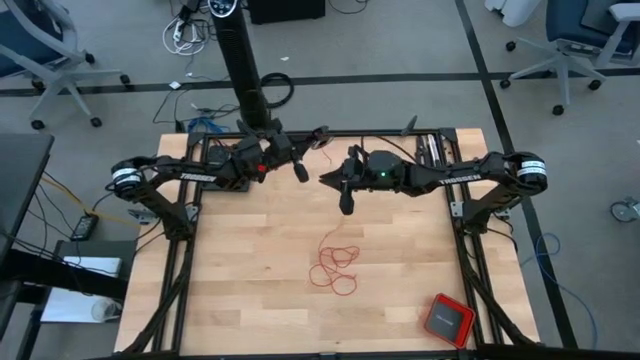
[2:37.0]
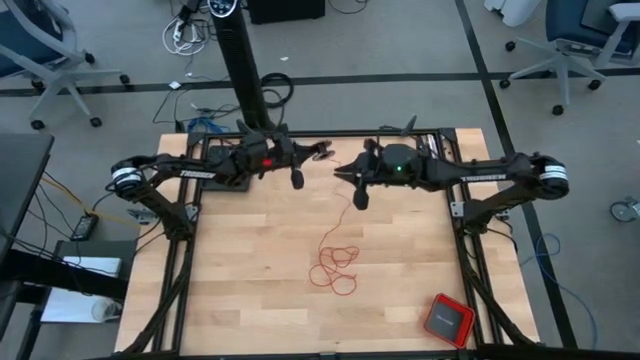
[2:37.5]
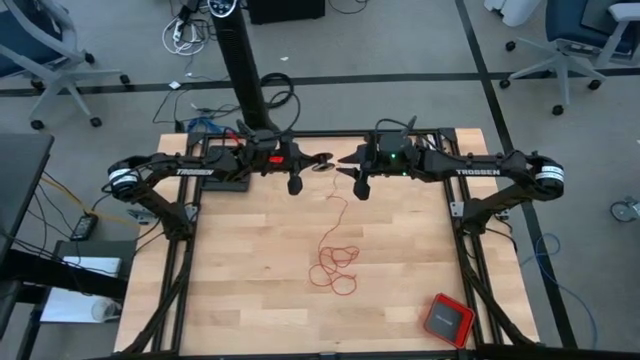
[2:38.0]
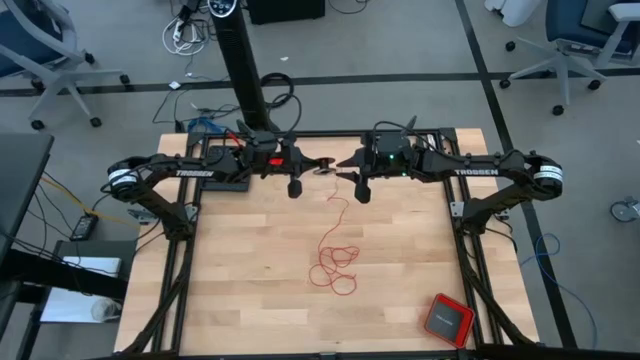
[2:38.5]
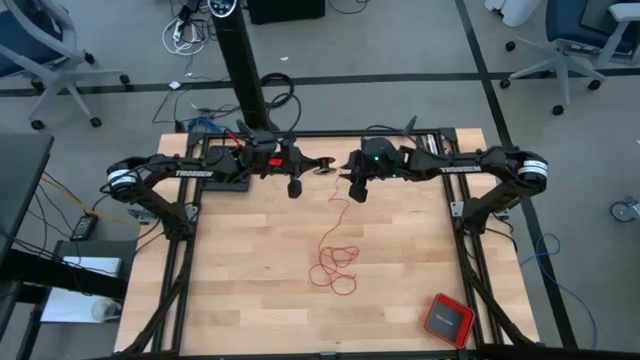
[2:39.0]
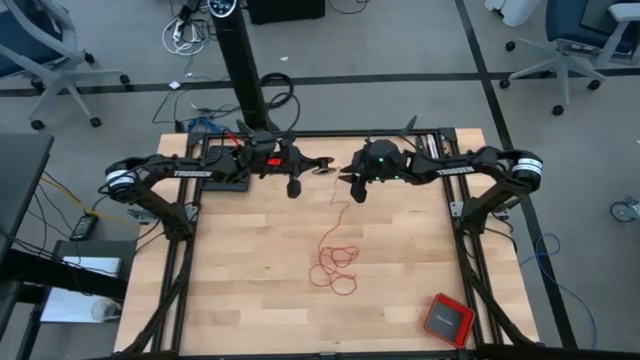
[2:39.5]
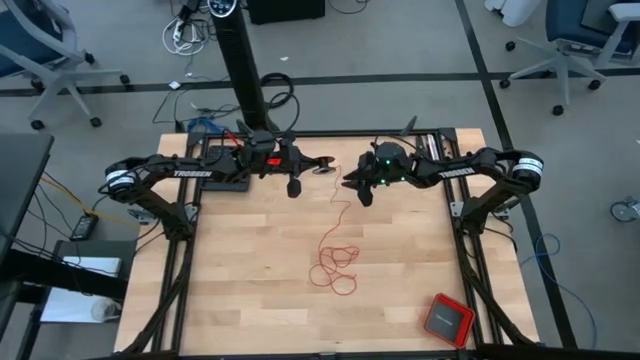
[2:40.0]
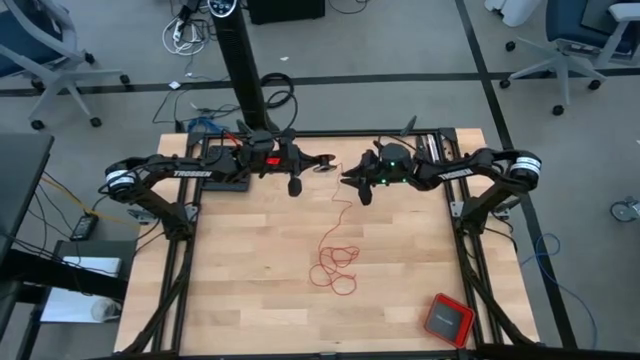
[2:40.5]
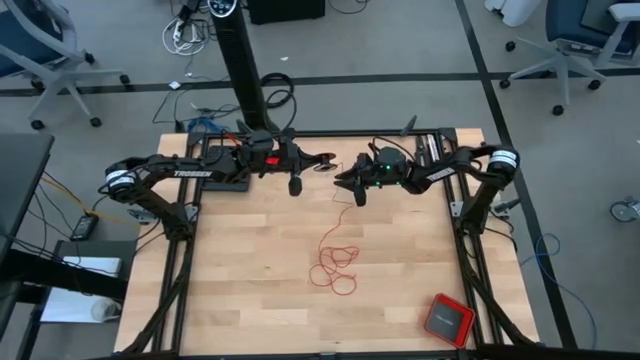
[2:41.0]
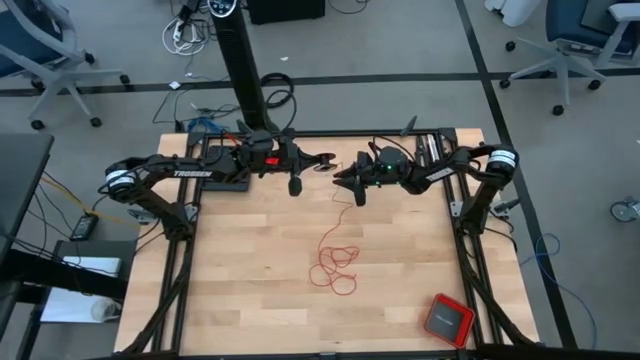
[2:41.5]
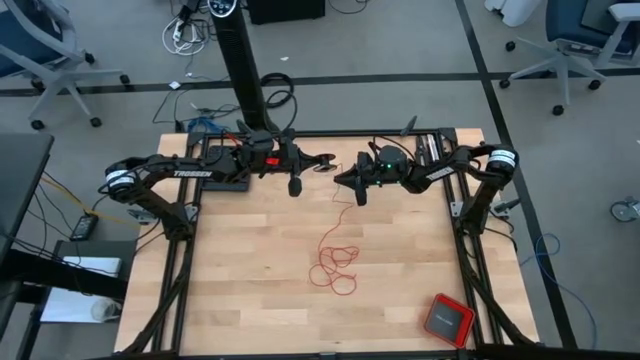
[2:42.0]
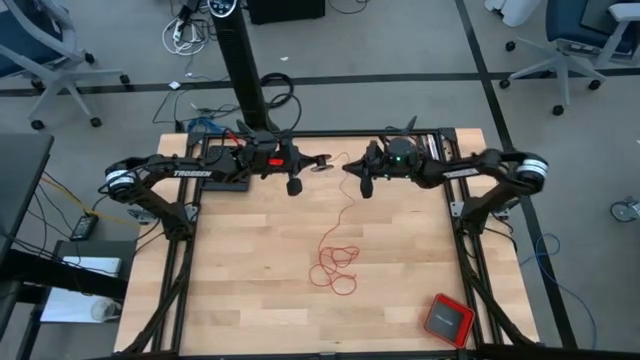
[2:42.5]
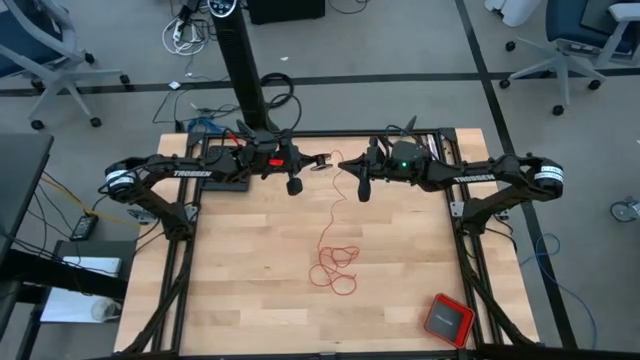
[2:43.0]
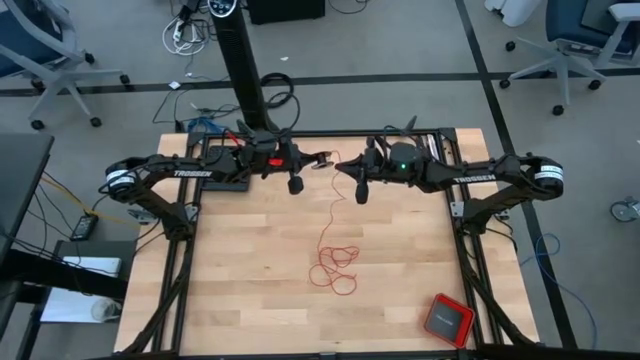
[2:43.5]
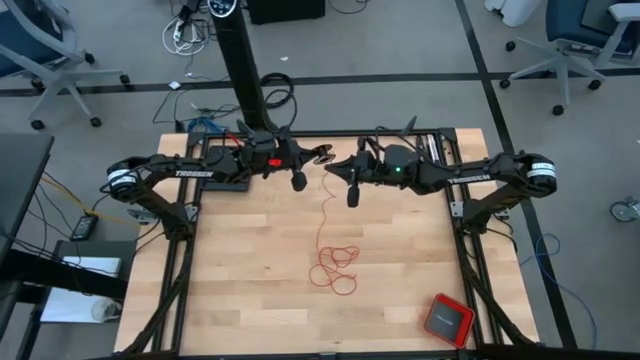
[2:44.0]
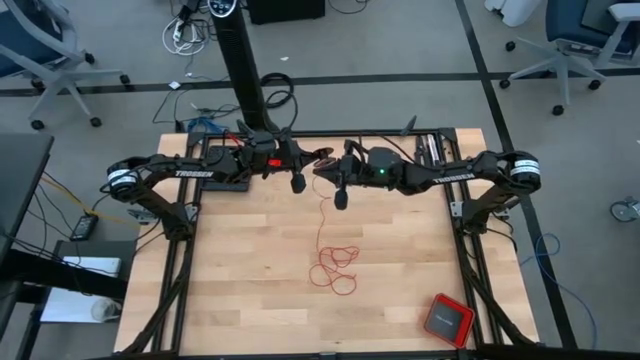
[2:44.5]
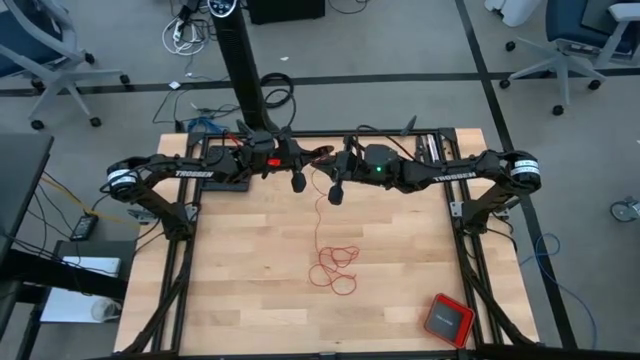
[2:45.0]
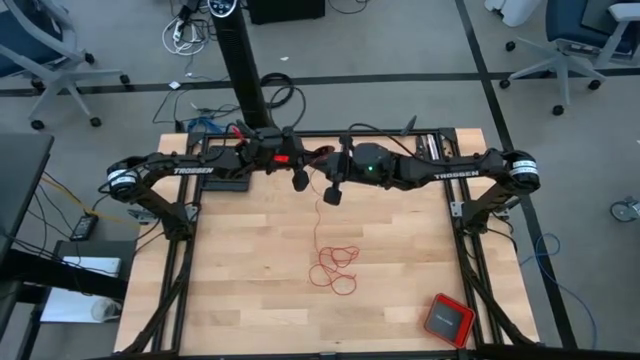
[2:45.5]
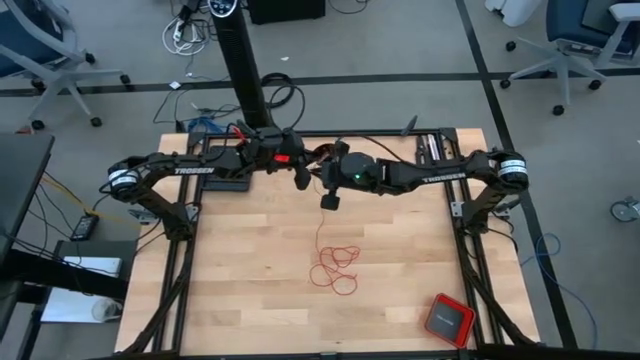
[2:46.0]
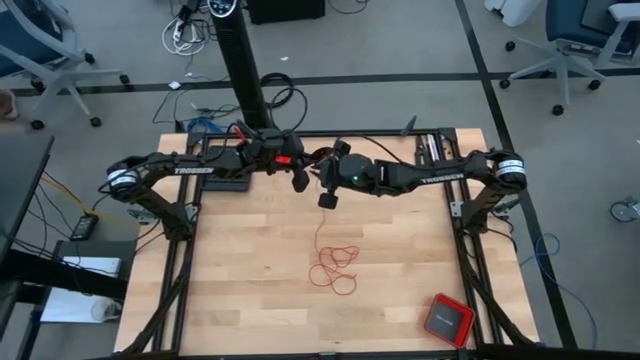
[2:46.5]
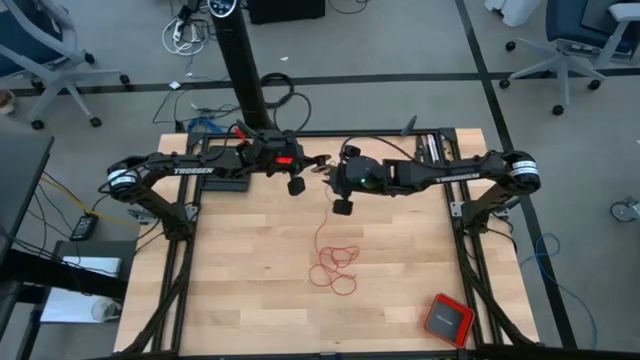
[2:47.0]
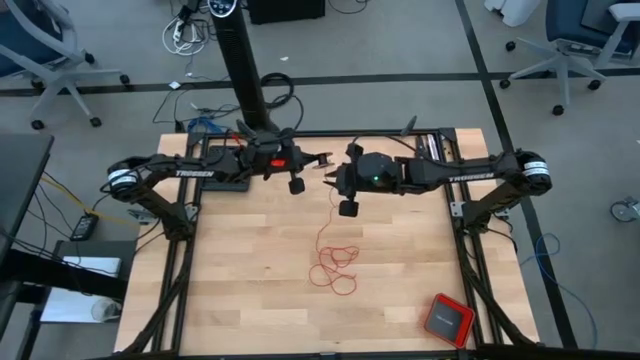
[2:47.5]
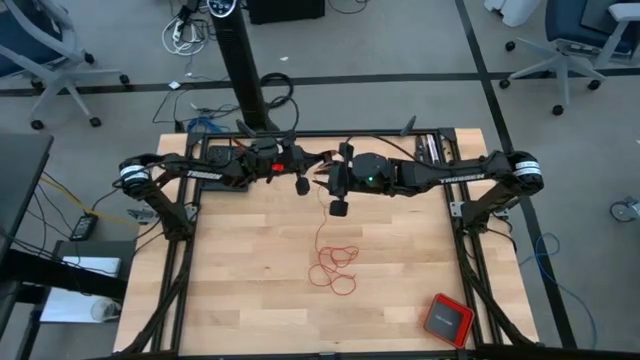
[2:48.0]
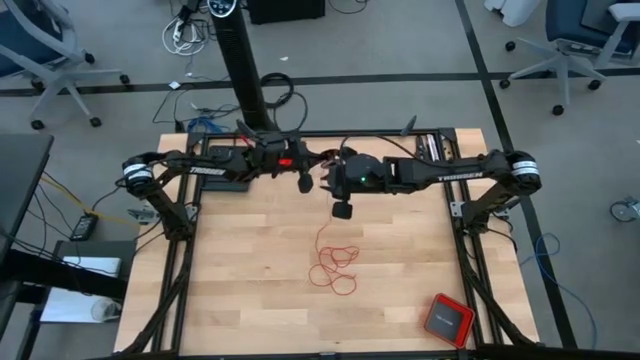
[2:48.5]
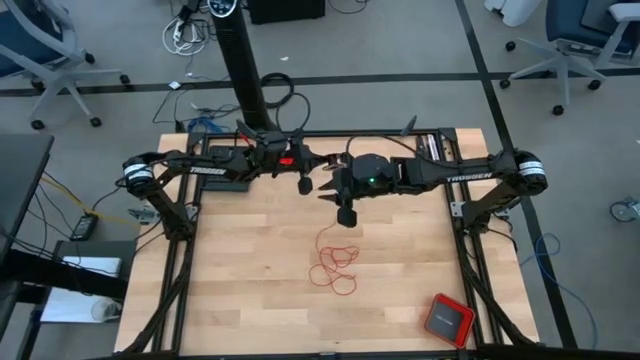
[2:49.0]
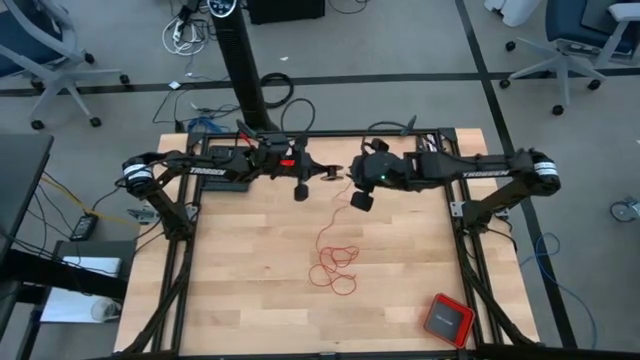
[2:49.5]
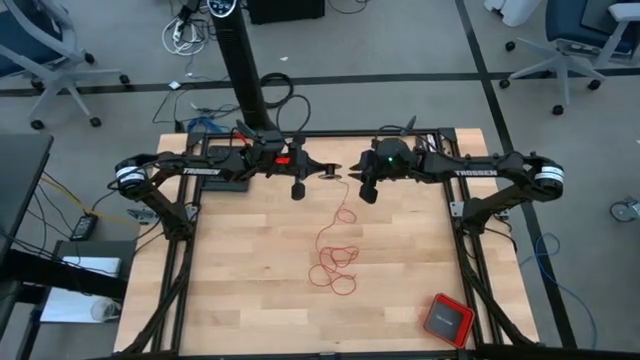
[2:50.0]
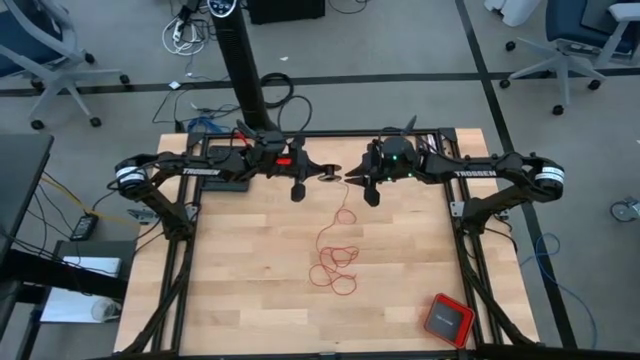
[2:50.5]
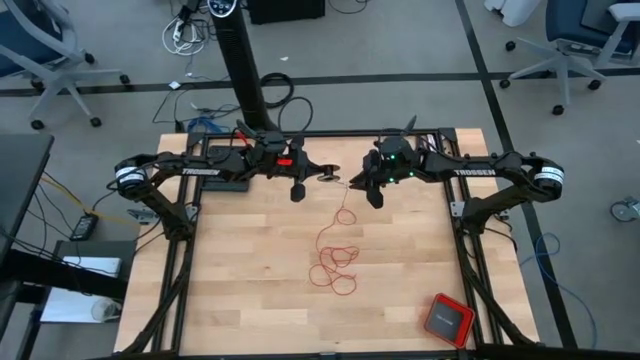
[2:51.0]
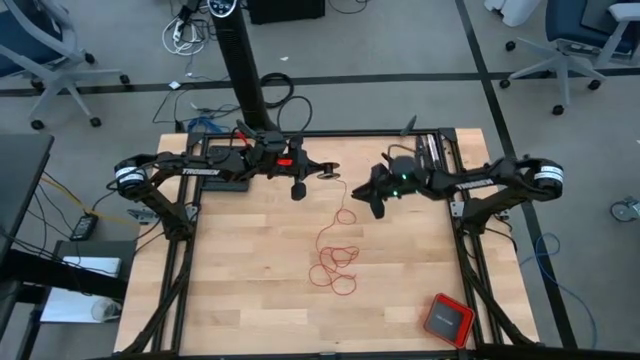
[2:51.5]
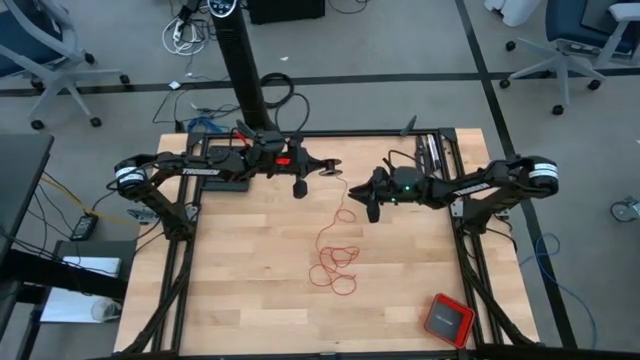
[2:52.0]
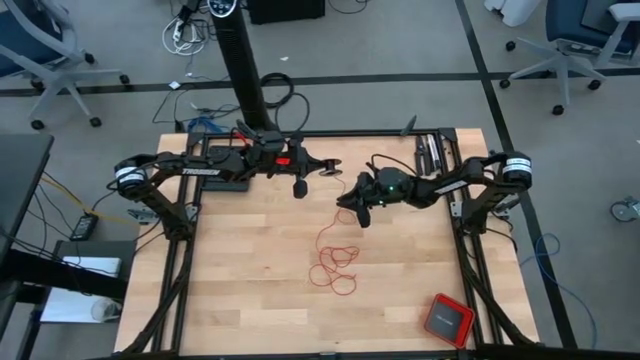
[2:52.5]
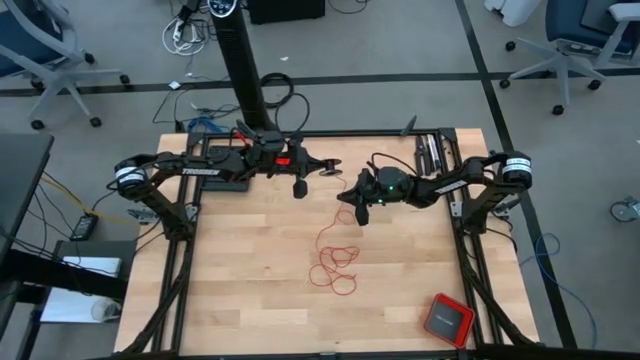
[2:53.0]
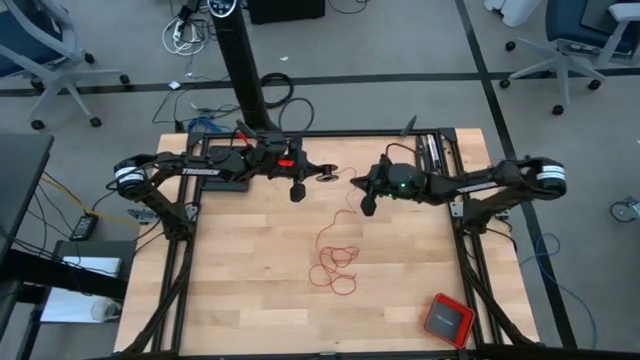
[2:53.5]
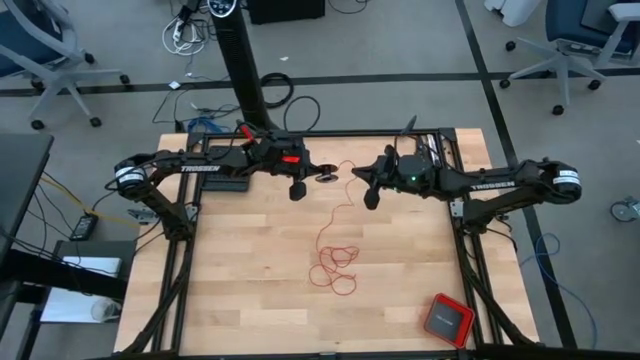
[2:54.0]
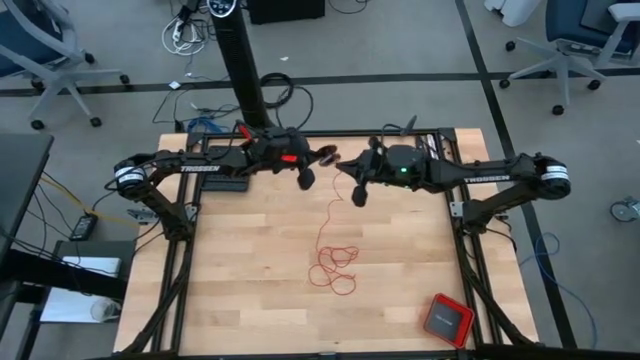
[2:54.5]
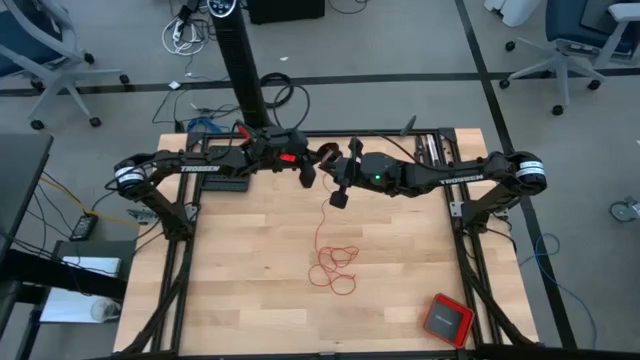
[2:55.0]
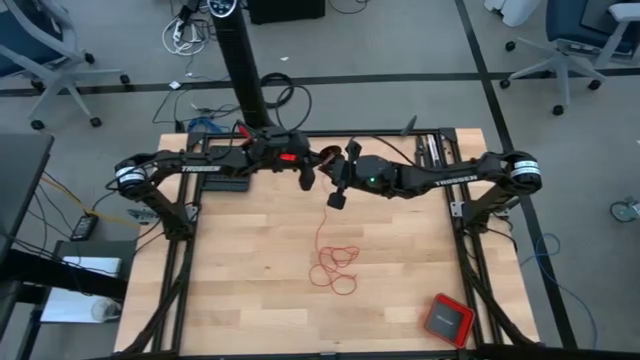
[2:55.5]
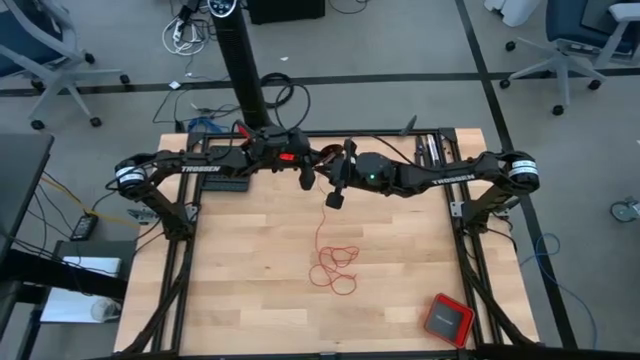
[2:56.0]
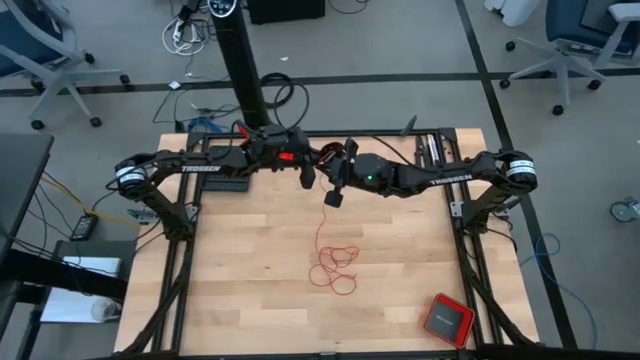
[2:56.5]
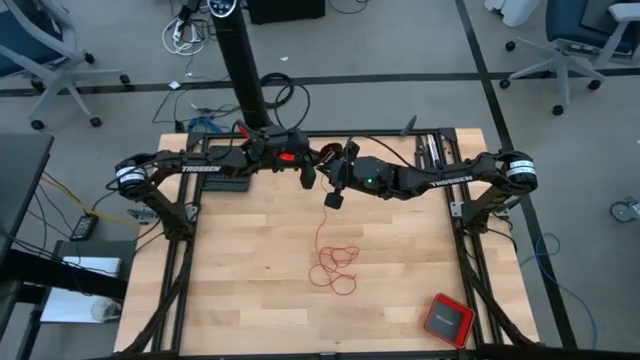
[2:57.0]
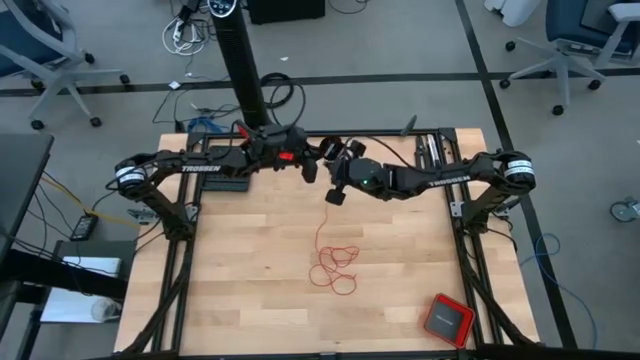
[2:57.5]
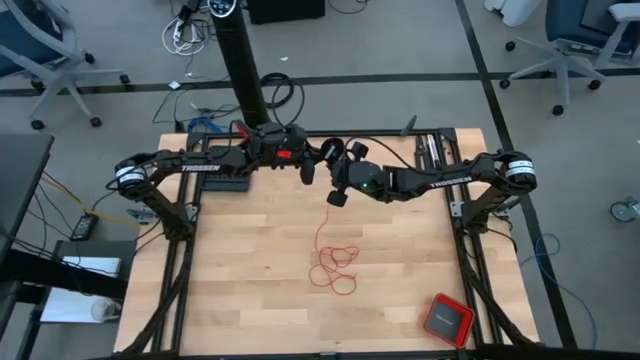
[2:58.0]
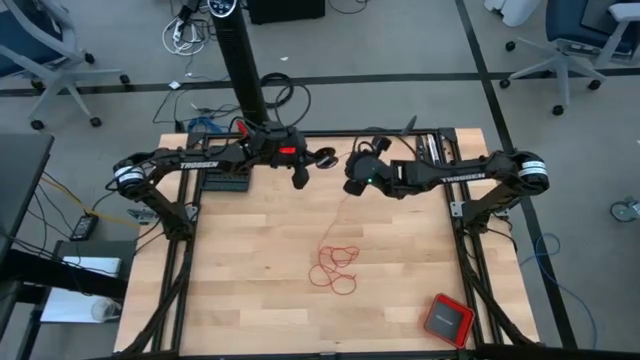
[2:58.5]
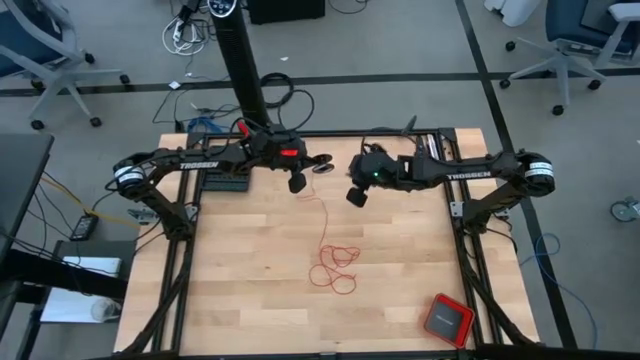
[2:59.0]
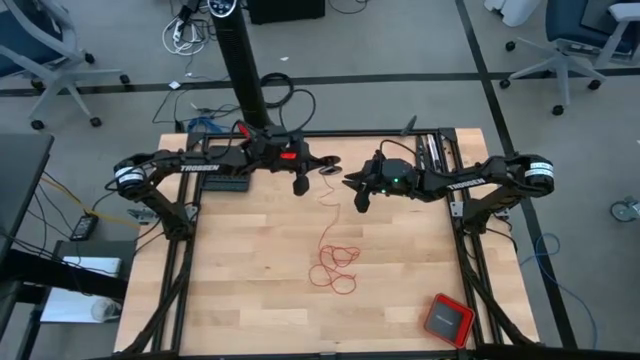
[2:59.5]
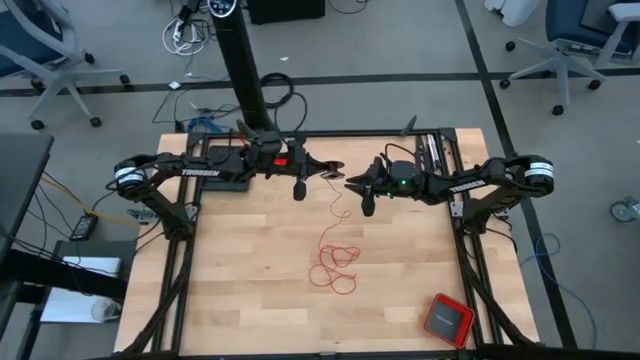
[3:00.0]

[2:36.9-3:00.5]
Task: Coil cords
Coil the red wire onto the spool
